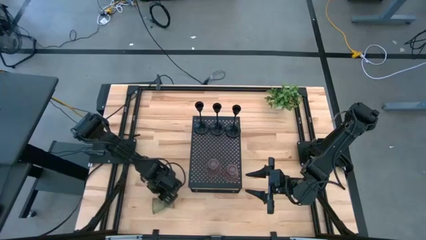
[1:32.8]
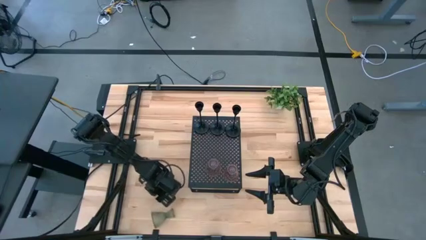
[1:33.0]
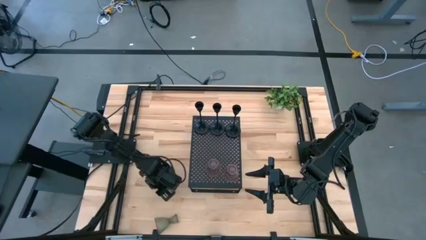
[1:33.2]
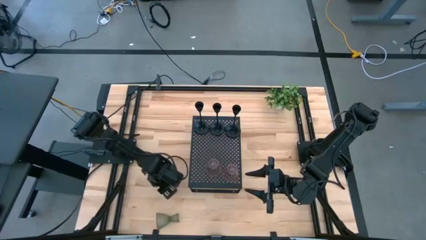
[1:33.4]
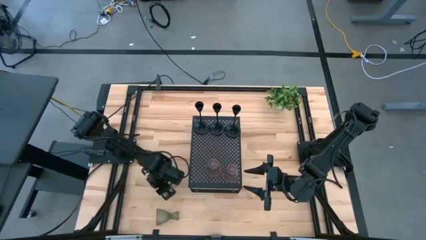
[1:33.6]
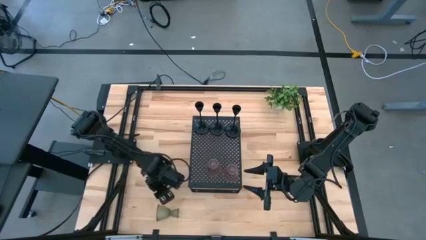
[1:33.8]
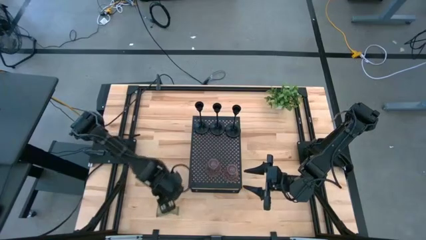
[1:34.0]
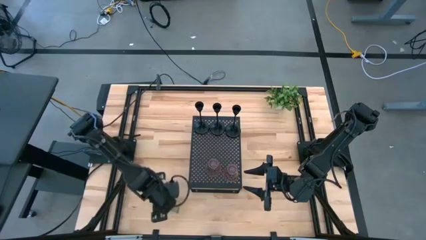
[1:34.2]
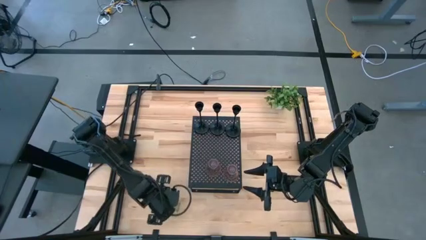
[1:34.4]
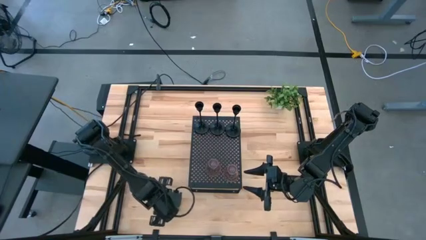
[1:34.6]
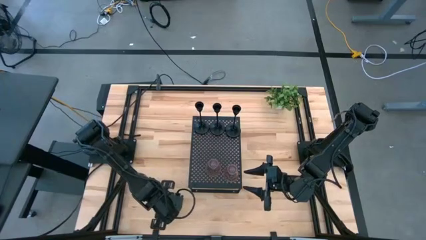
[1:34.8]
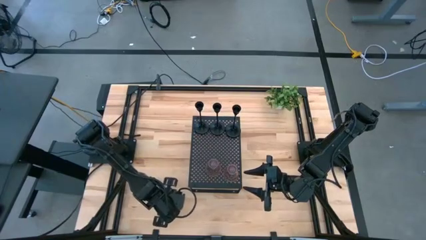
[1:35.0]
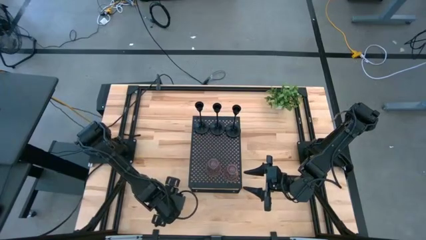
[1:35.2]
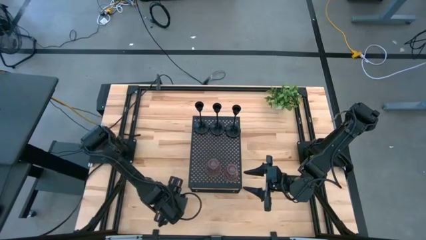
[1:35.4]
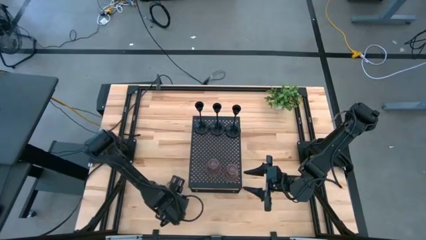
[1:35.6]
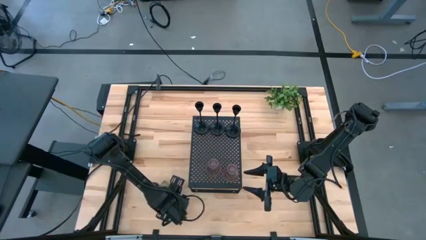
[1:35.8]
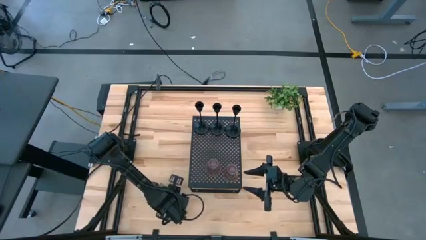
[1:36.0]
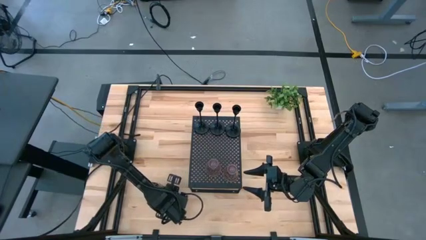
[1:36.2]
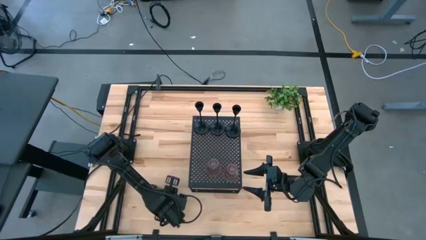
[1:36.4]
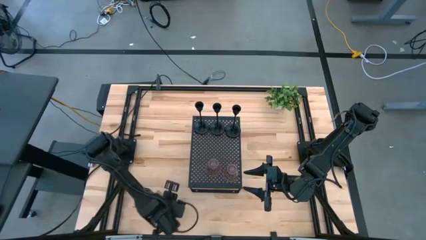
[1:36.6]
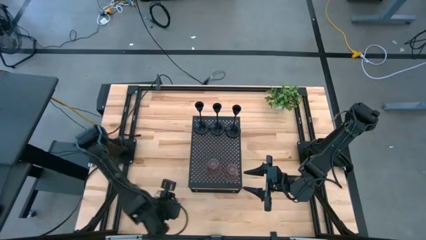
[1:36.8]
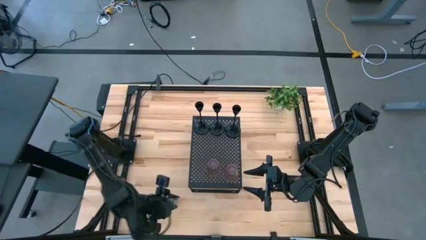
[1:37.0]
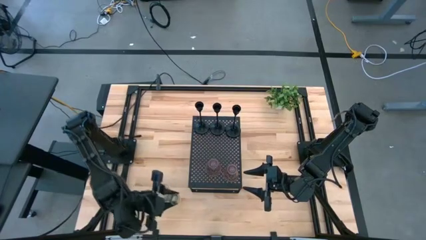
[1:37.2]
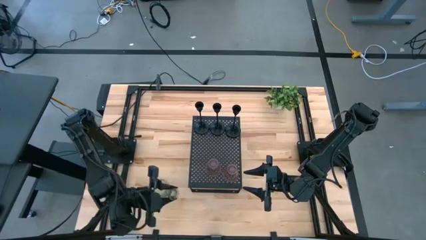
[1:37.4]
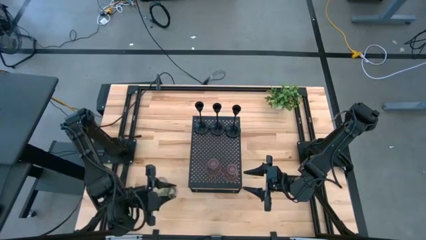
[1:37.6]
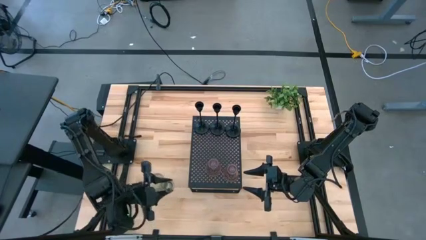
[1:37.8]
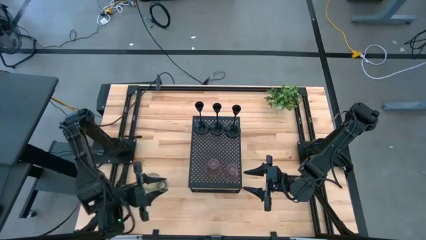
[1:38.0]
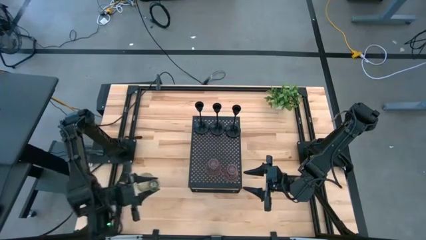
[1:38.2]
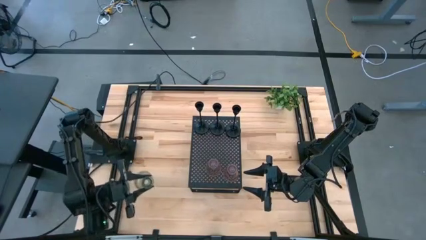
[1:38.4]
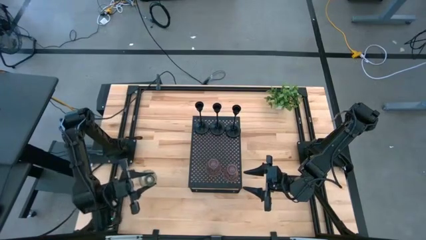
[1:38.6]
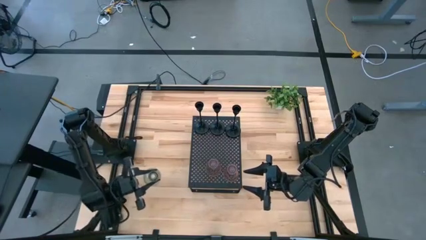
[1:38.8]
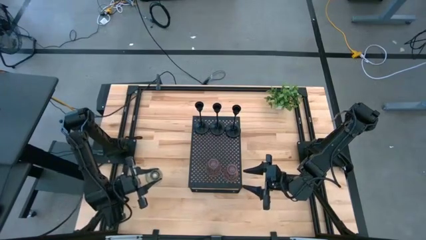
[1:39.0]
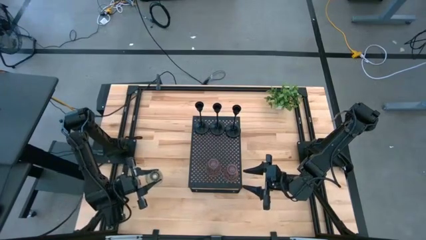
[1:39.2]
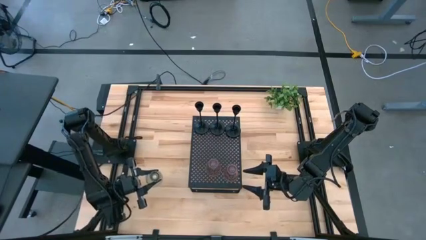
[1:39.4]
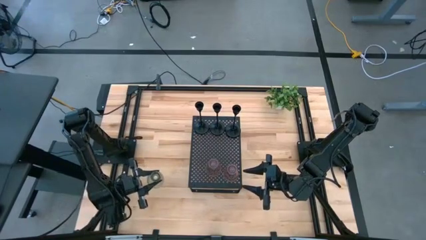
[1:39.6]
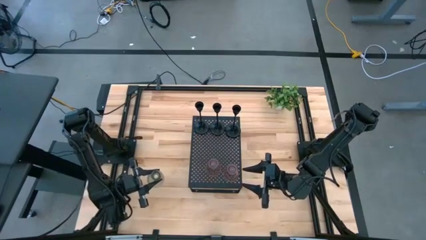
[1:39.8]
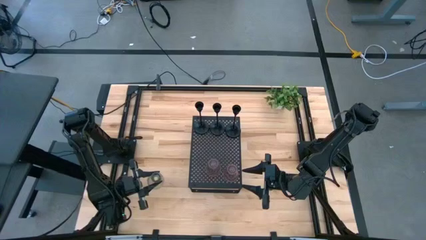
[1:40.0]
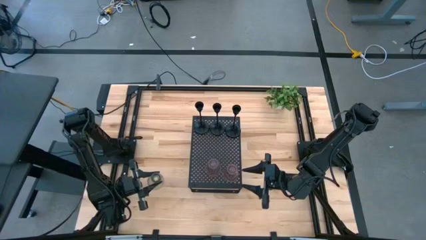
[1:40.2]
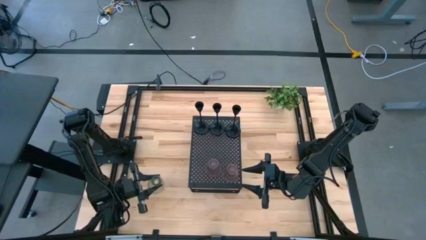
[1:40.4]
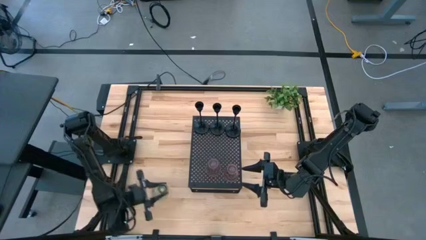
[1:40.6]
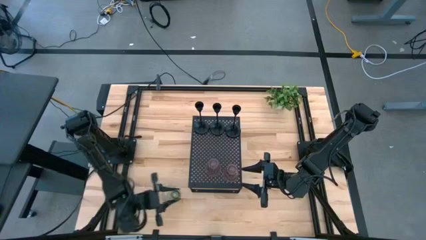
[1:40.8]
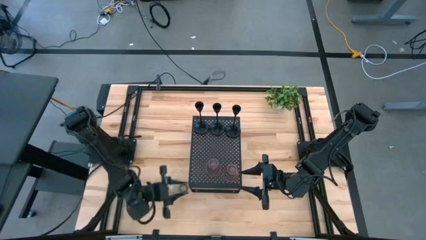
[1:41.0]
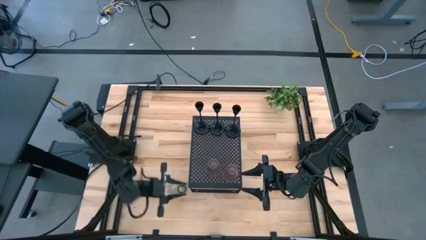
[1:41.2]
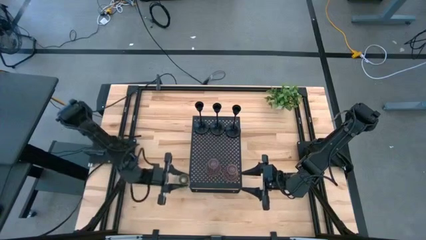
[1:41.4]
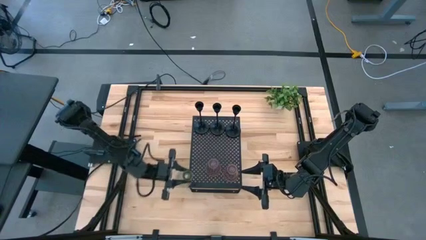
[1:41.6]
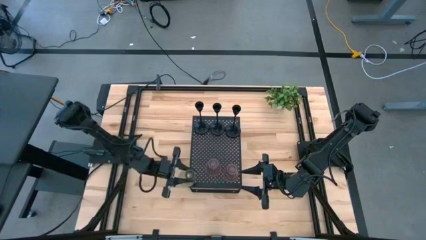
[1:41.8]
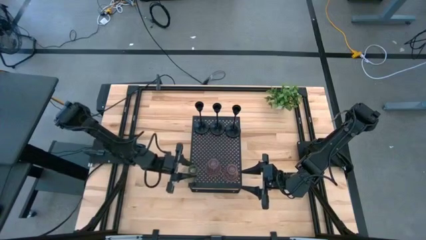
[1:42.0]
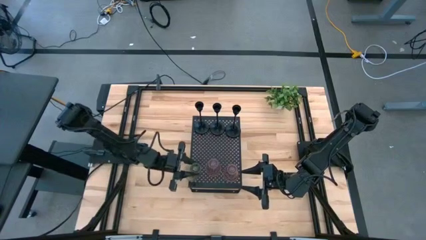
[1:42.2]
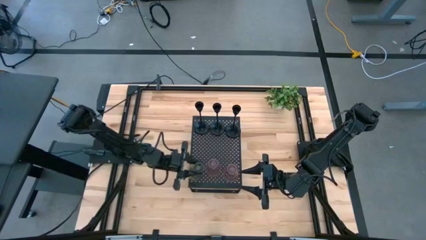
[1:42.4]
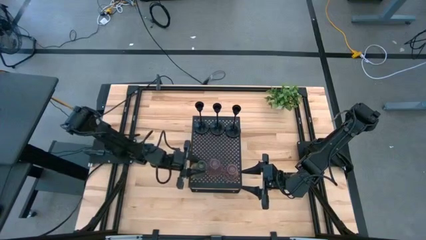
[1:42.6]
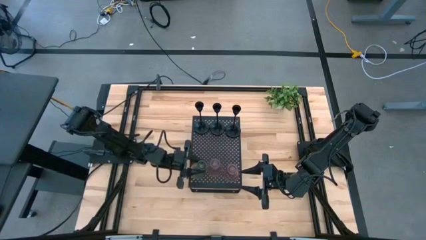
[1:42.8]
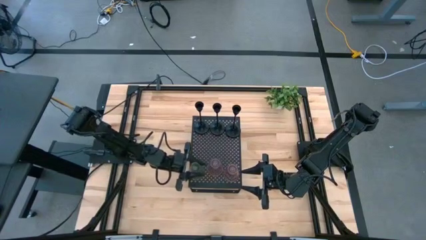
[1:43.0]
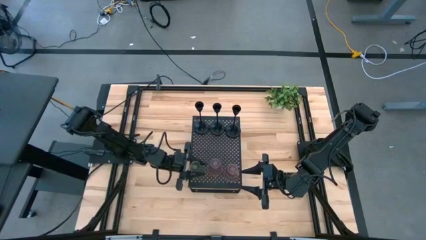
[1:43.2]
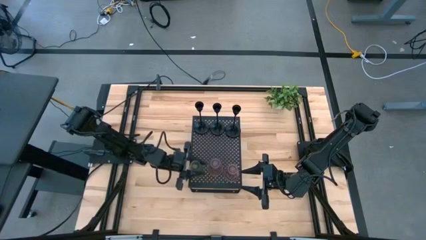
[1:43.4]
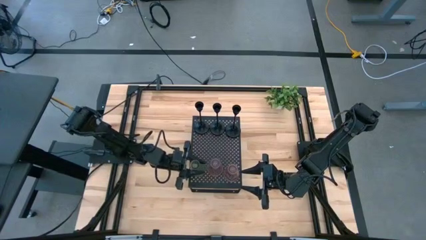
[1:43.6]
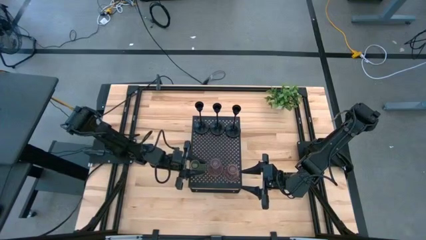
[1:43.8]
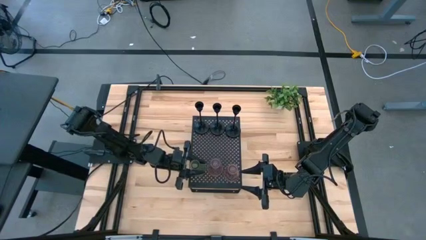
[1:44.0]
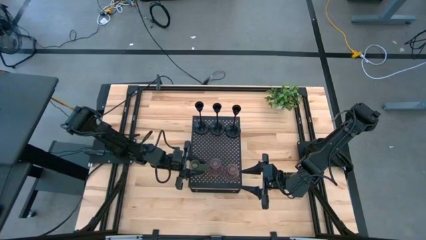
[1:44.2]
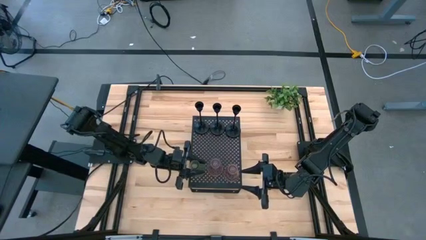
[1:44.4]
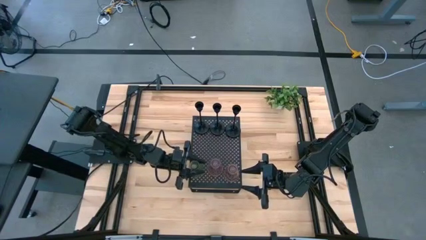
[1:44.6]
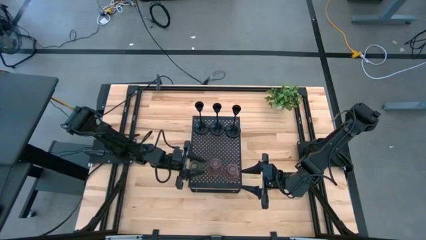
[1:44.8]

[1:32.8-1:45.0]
Task: Pick & Place candle stick holders
Put the transparent candle holder on the shelf aligned with the other pink candle holders

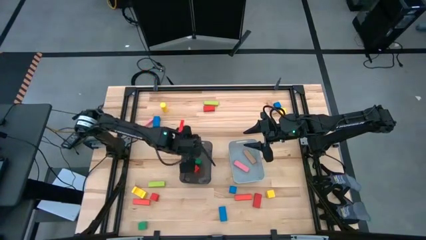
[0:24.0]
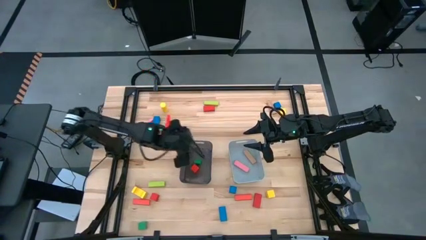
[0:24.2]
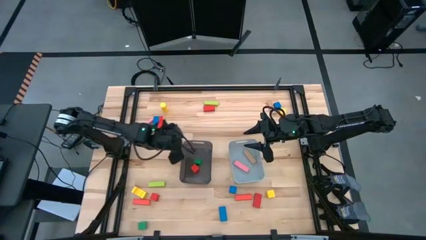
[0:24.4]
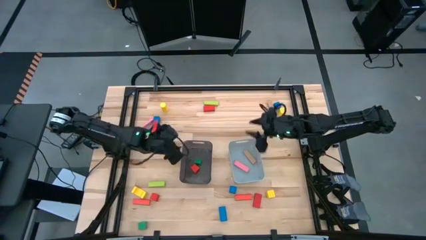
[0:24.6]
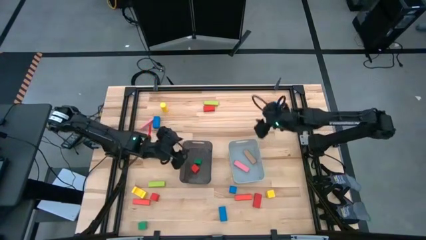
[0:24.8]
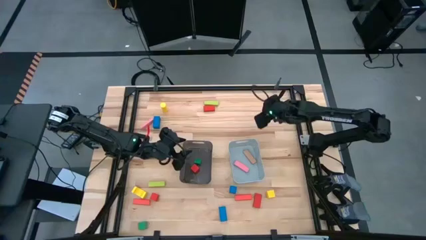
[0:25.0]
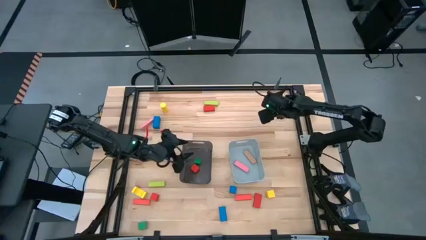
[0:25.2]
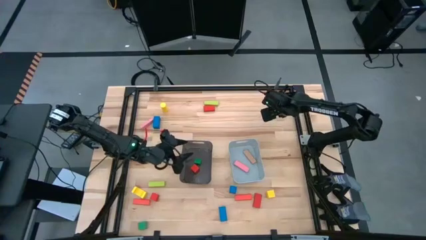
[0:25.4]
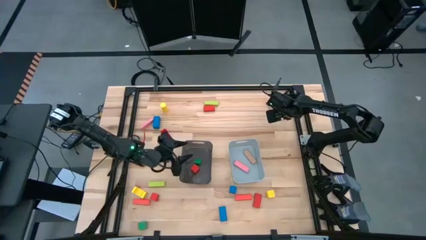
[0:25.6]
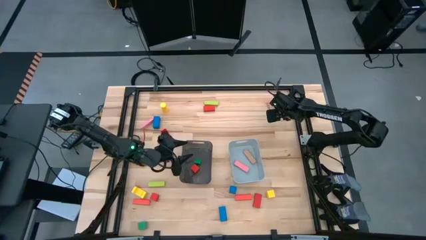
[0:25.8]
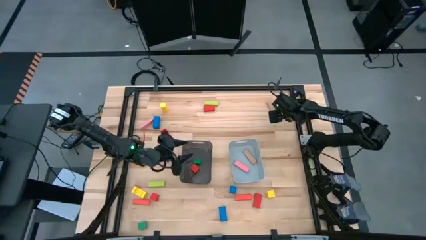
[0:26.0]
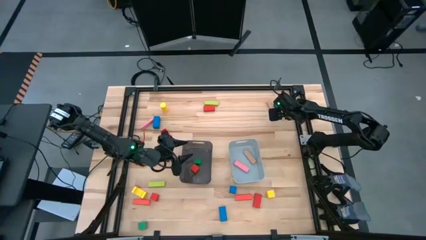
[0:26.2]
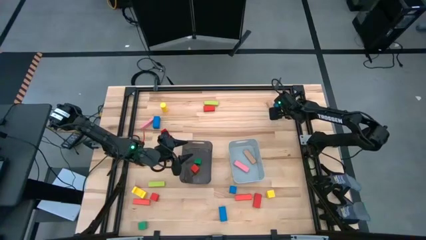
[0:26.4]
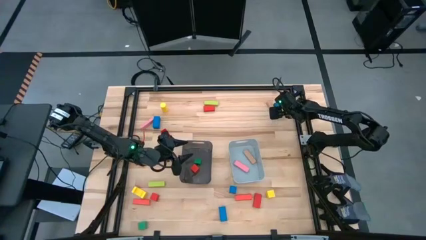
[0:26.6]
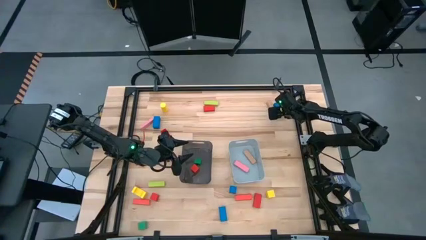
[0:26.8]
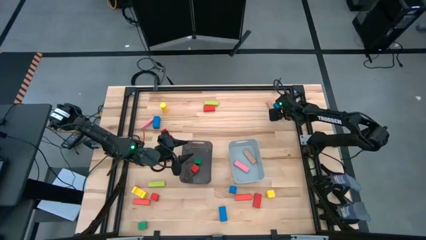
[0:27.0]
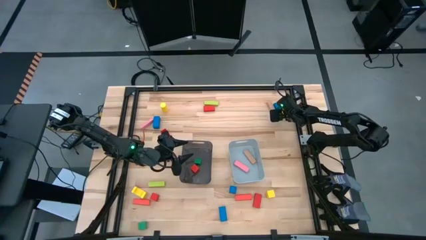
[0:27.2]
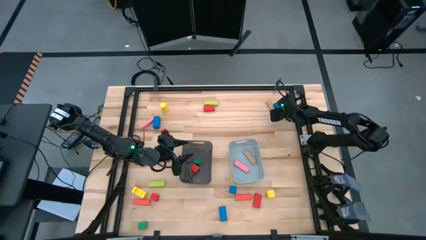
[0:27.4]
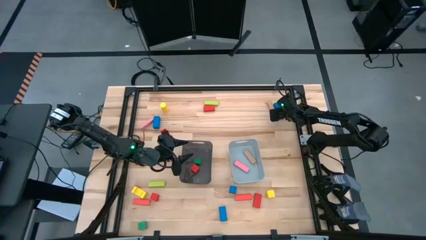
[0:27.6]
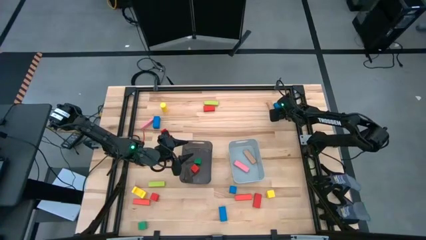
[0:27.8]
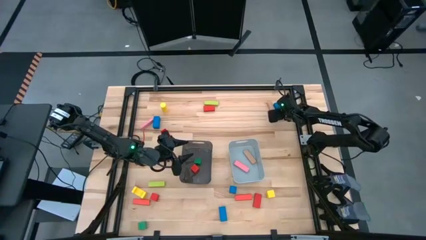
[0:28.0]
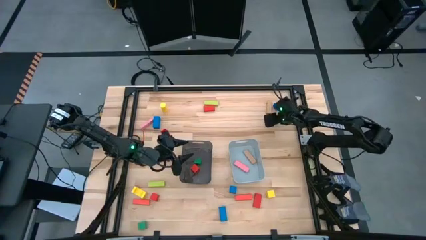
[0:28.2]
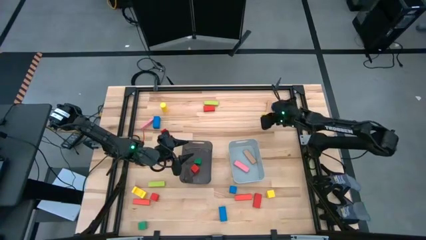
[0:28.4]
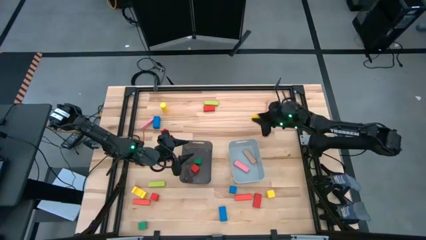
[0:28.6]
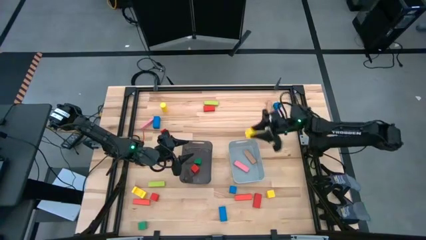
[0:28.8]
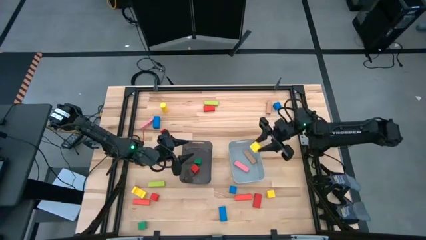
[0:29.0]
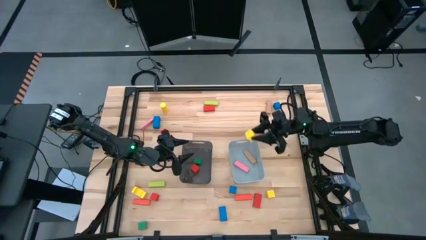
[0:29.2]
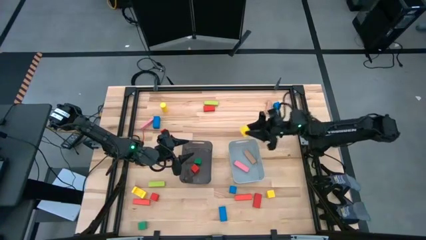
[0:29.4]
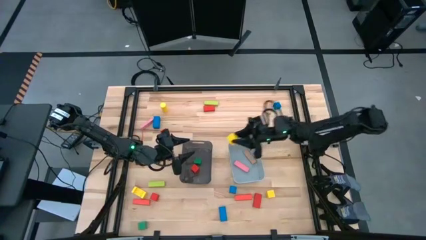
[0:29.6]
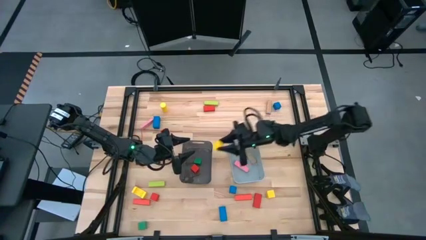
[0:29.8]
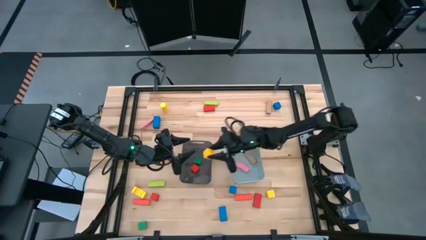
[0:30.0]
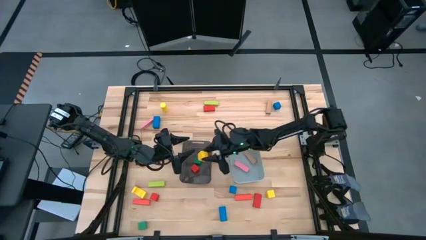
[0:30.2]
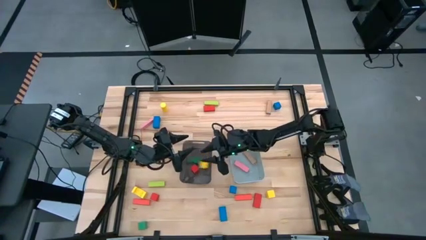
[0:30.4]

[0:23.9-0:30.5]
Task: Sort blocks by size
Put the top small yellow block into the black bin
